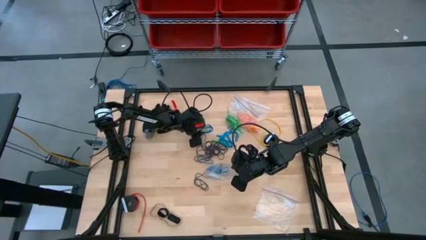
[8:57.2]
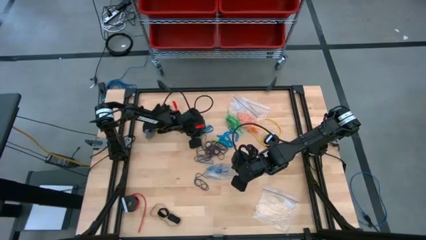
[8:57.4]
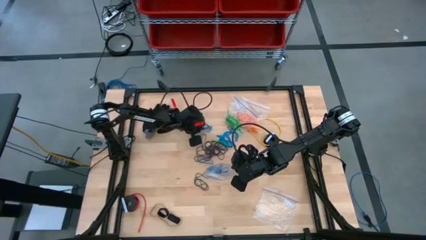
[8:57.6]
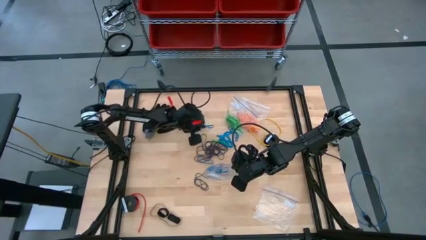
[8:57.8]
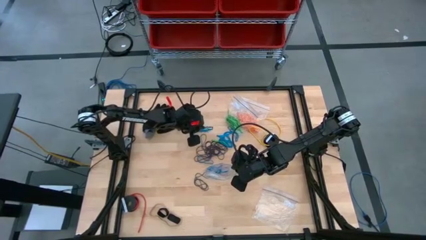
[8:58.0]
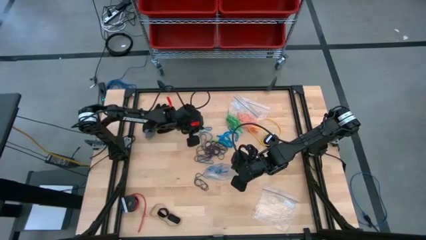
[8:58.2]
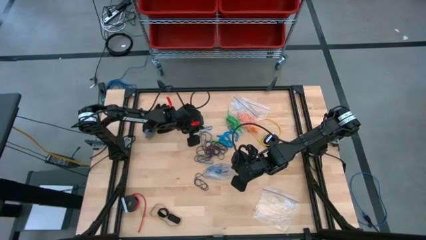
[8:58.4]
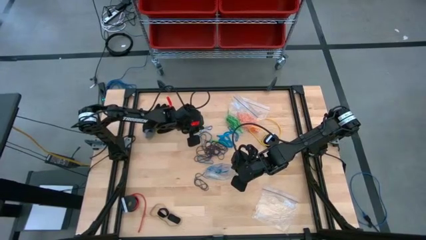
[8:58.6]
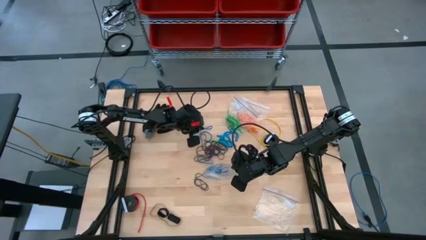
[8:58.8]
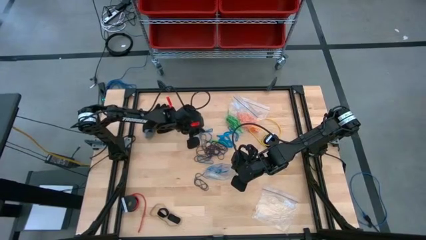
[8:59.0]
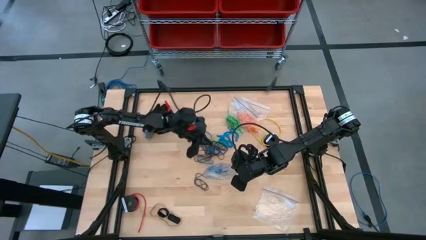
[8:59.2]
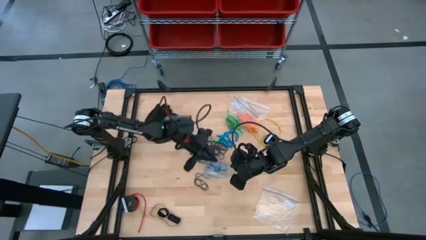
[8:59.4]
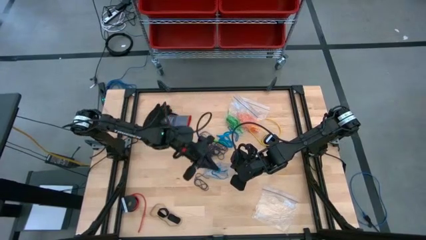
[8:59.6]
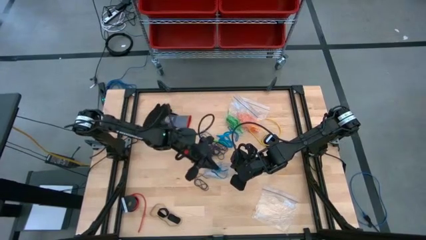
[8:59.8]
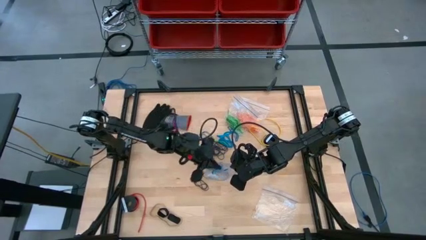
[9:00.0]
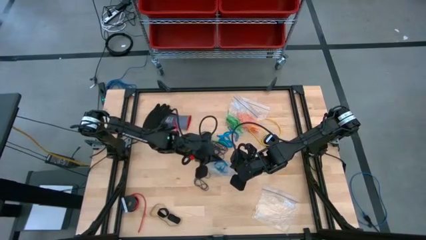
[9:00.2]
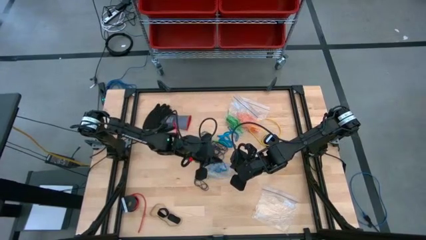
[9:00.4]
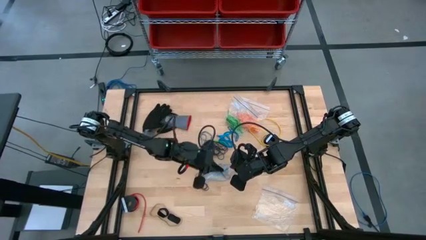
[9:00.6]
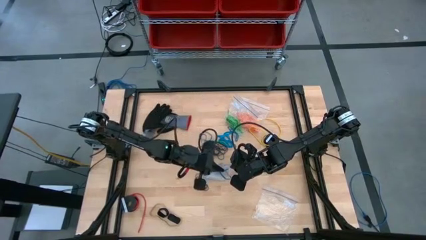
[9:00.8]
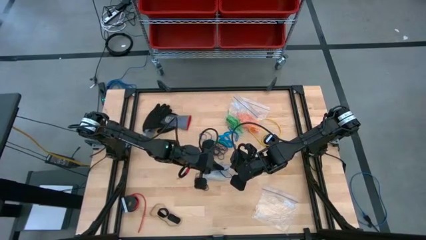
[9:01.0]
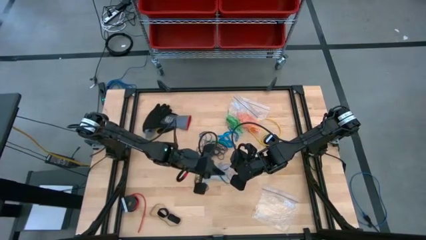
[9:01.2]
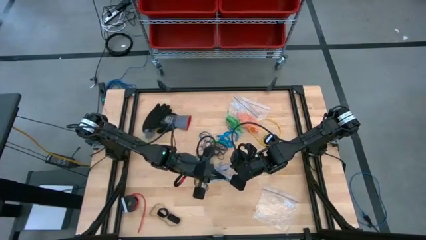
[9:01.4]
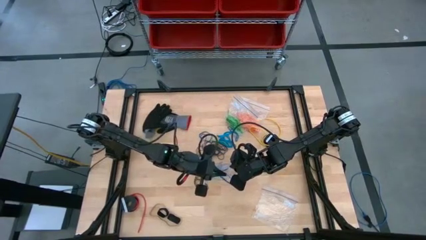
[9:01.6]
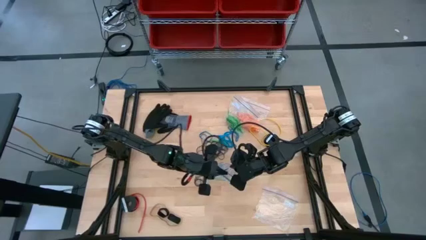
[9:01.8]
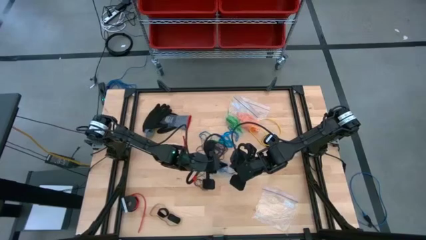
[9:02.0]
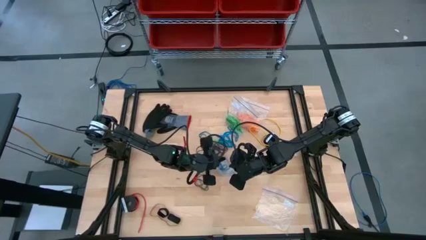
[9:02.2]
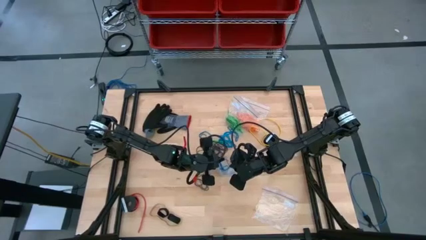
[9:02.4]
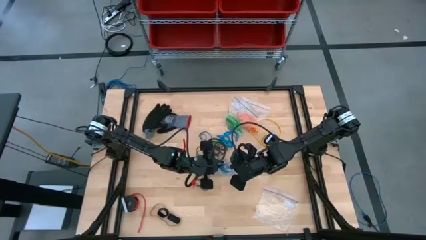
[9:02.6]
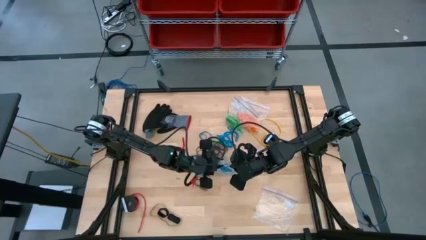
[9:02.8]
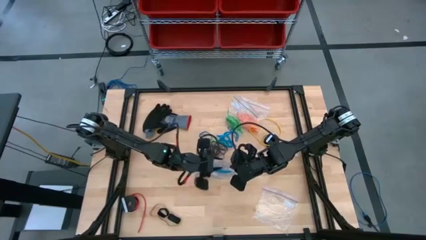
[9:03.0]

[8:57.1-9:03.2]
Task: Sort rubber bands
Put the blue rubber band into the transparent zip bag

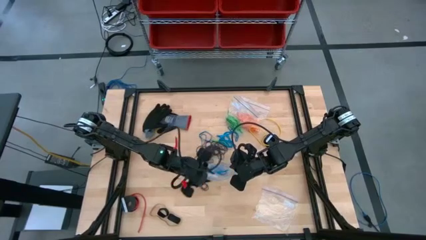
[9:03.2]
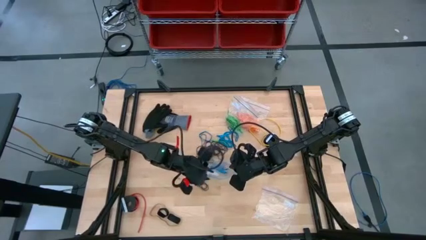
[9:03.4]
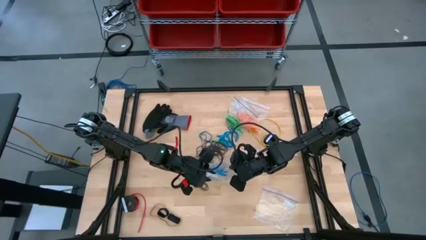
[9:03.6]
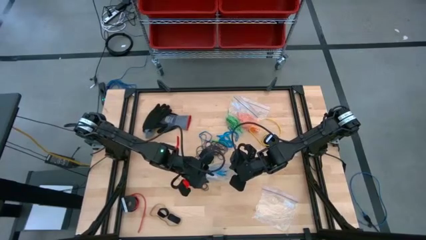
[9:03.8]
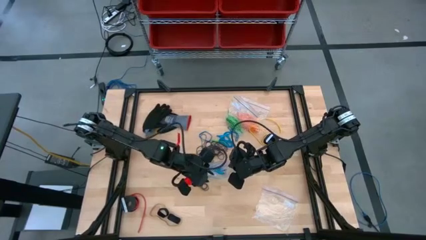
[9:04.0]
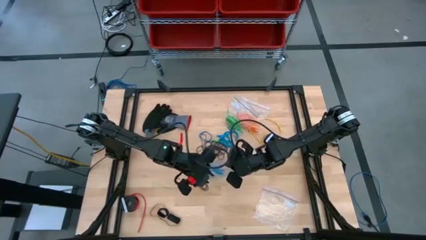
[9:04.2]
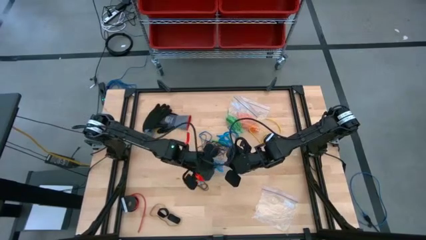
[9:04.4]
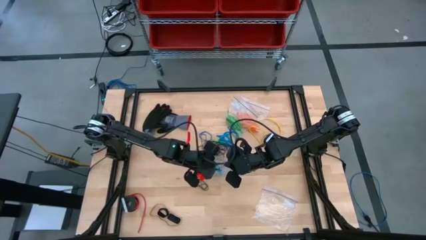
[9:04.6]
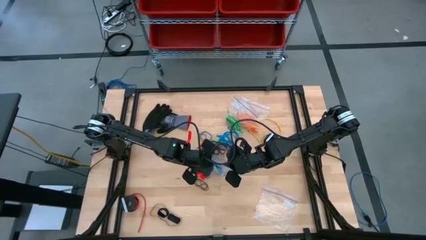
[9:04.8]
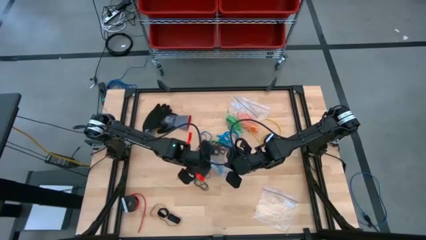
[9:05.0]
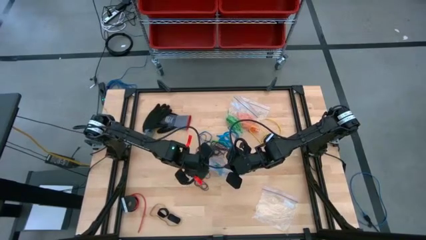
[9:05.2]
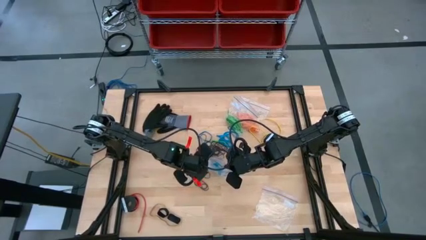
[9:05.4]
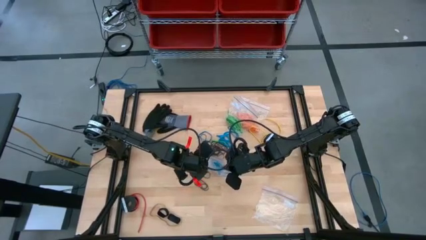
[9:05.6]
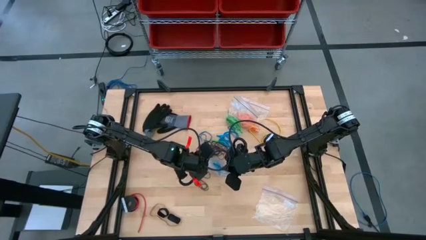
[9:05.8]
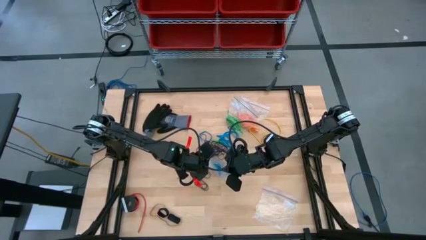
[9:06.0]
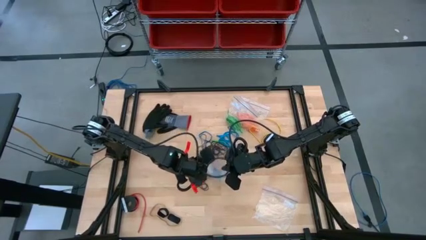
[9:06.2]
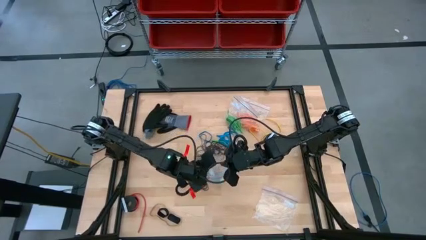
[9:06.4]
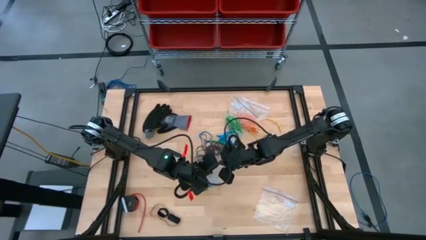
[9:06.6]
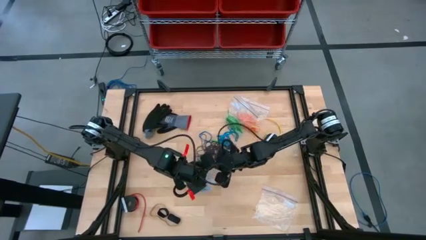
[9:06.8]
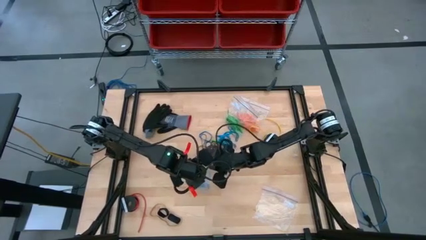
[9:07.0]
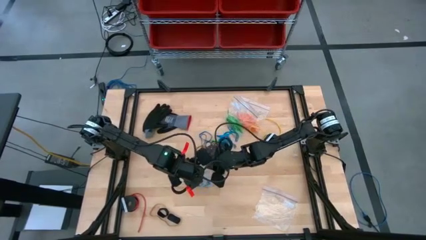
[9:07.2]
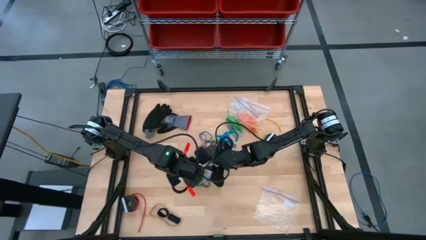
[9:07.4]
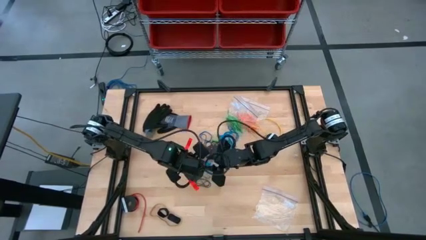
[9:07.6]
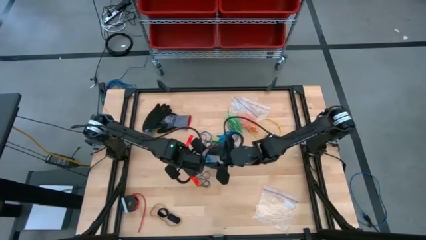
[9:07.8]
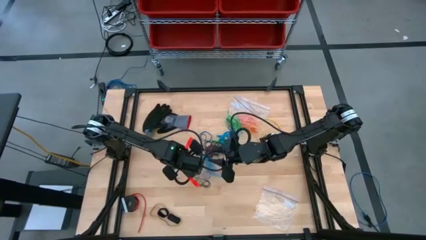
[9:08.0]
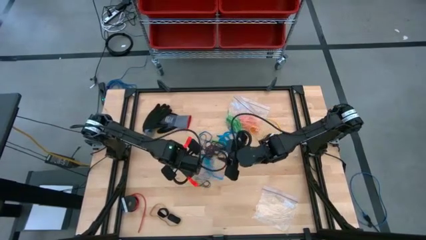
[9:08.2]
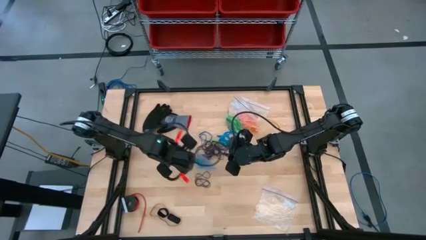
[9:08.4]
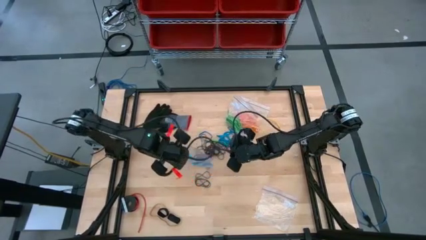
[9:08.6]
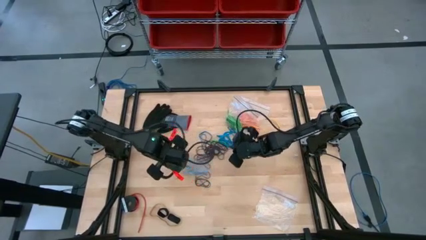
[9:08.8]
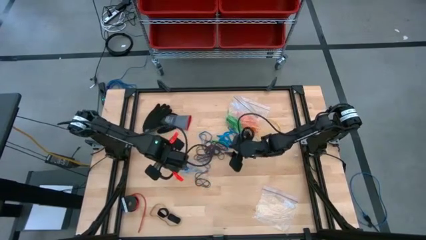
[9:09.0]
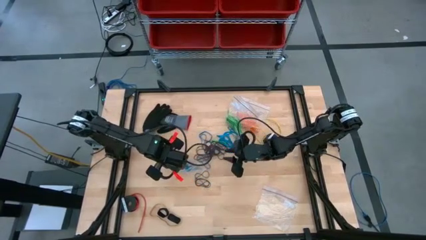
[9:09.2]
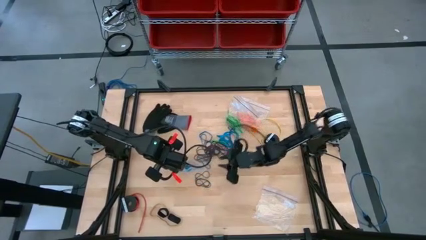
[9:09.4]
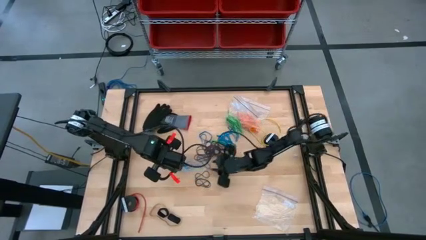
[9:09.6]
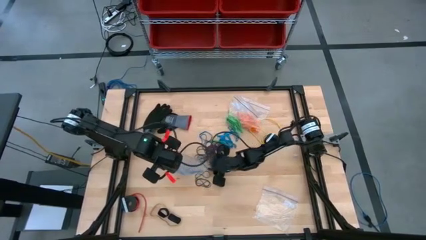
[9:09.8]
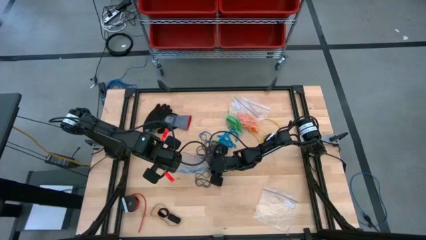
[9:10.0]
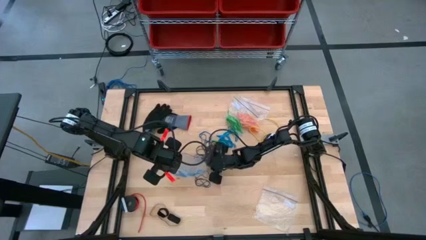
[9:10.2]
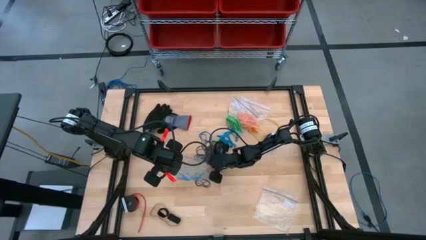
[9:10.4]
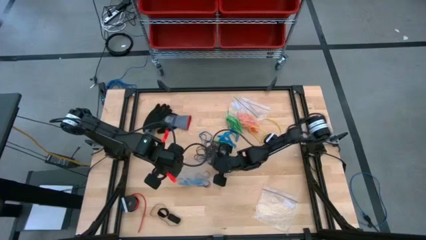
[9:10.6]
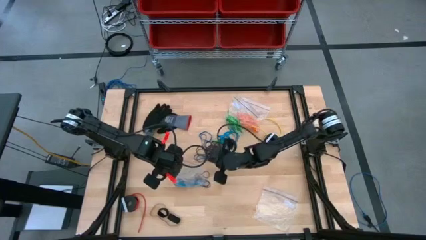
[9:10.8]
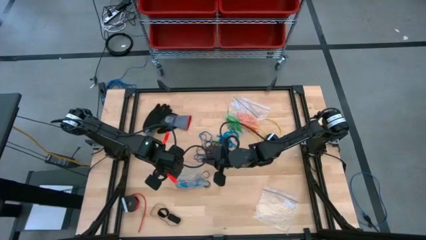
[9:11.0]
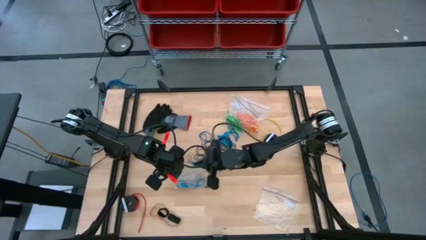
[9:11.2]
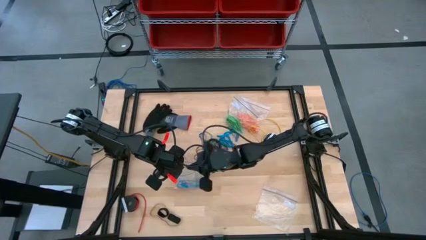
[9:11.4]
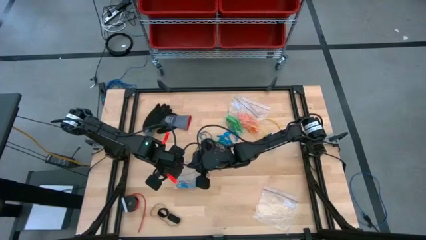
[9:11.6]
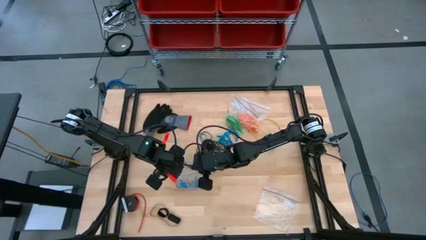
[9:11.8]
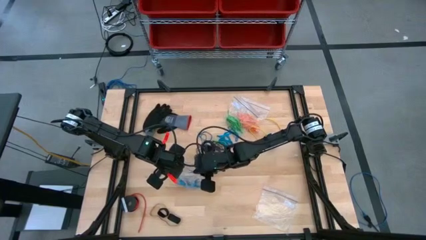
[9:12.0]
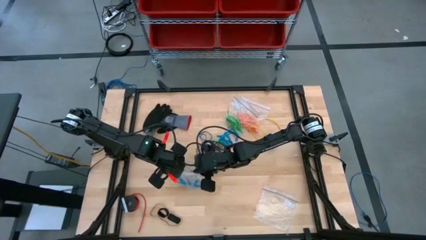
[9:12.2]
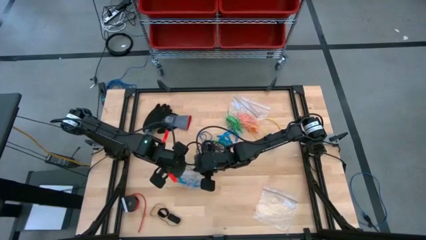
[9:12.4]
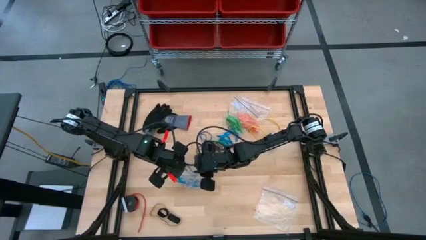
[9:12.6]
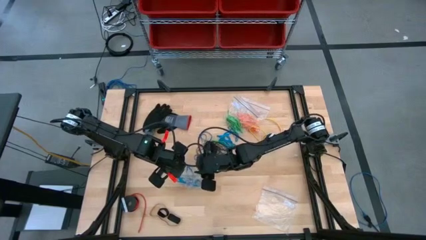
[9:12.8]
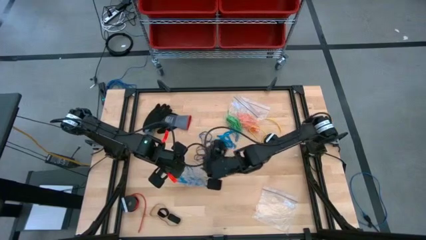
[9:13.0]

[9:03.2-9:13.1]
Put the blue rubber band into the transparent zip bag
